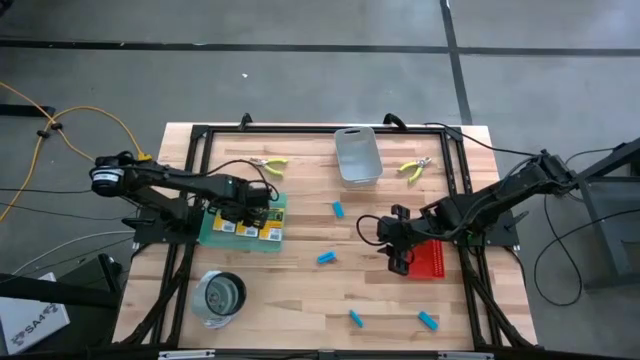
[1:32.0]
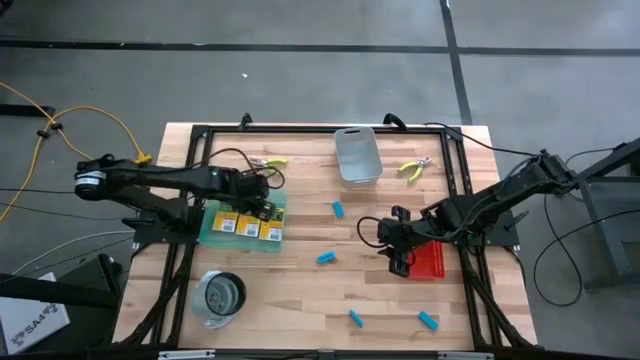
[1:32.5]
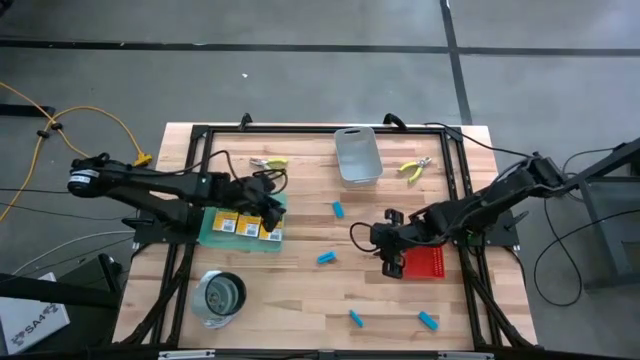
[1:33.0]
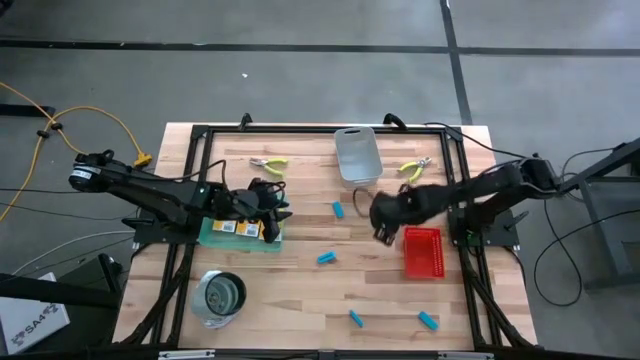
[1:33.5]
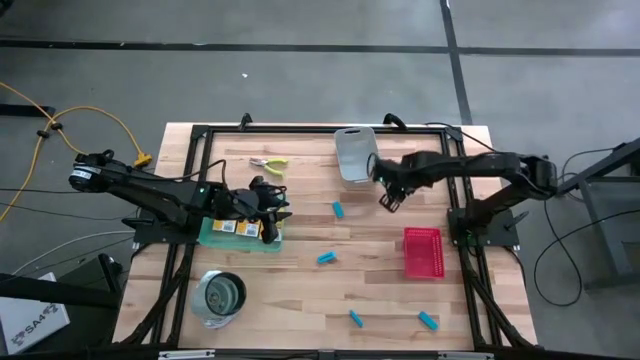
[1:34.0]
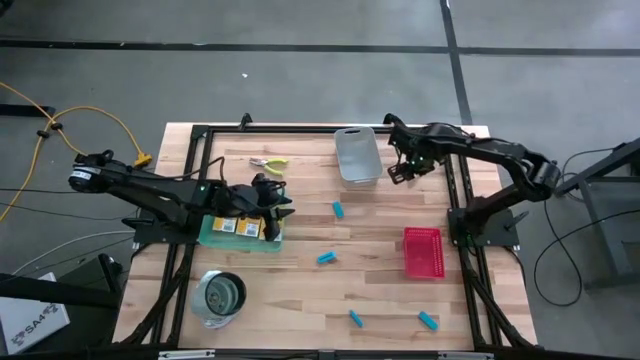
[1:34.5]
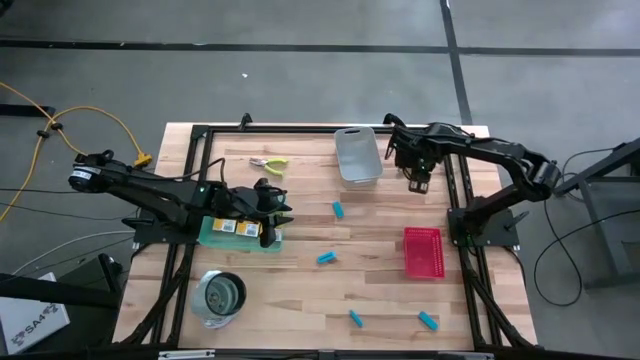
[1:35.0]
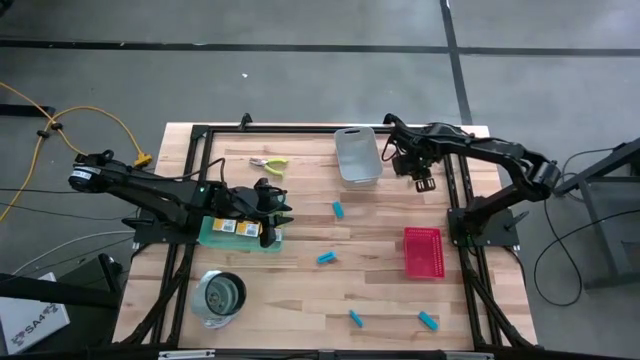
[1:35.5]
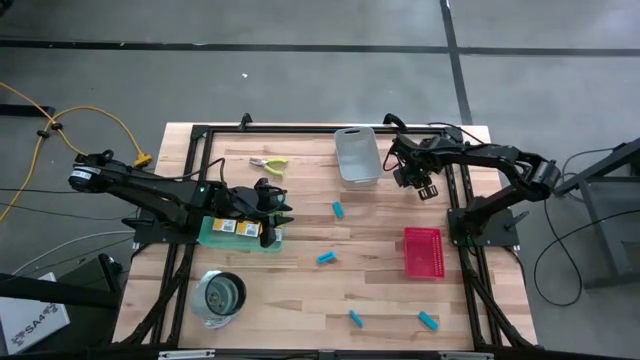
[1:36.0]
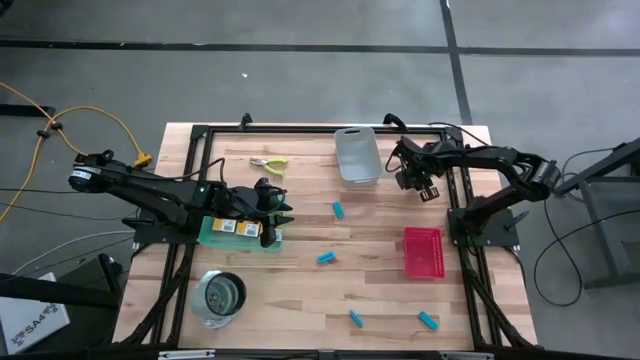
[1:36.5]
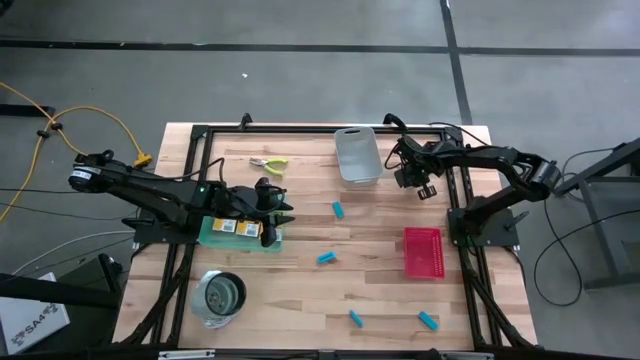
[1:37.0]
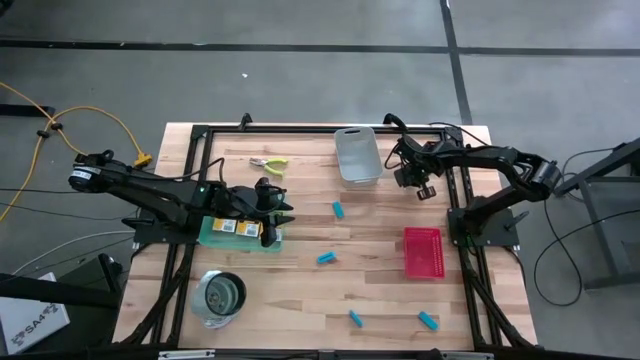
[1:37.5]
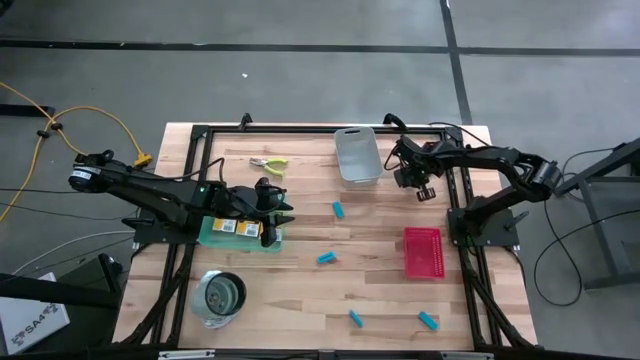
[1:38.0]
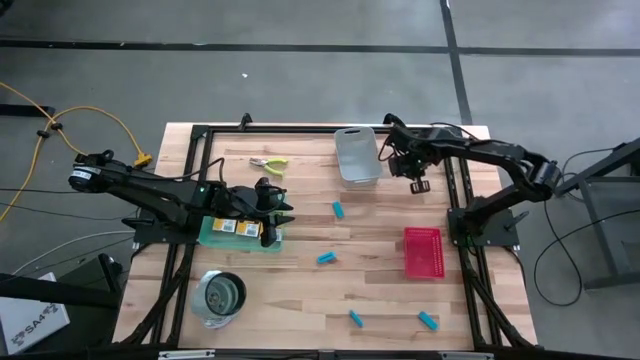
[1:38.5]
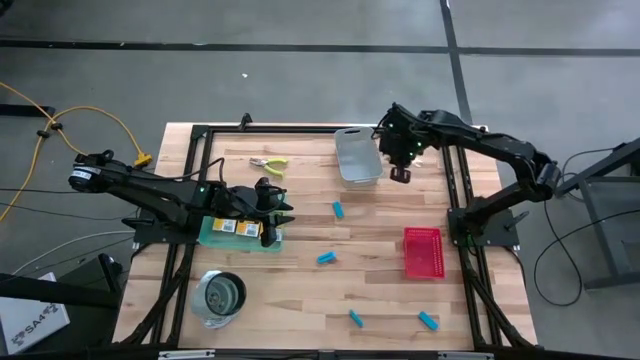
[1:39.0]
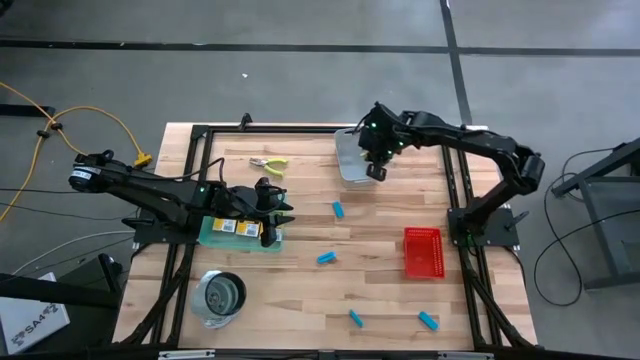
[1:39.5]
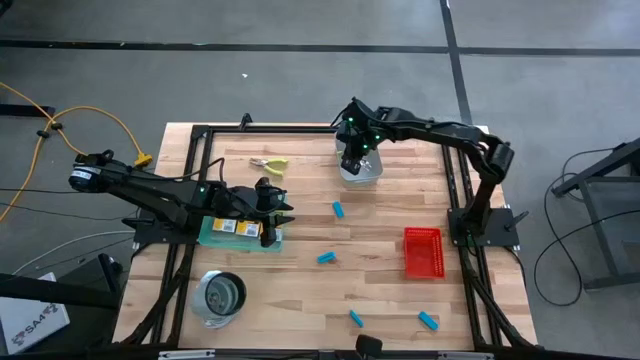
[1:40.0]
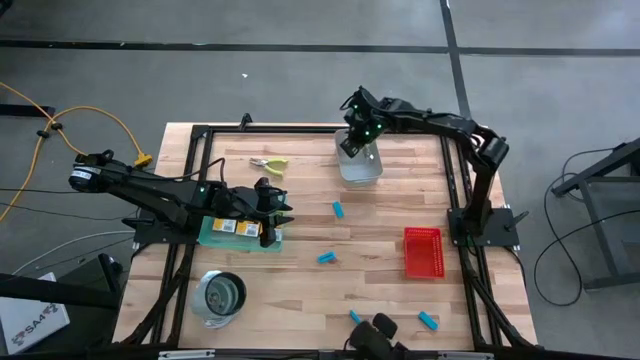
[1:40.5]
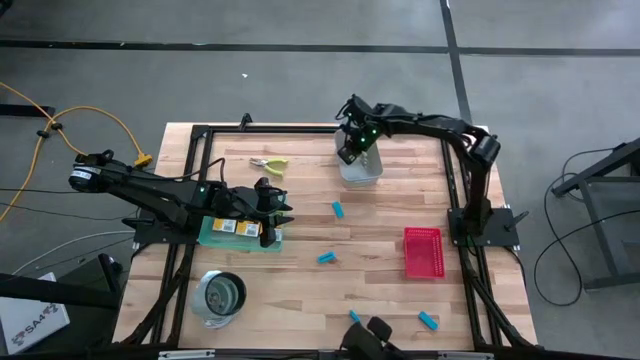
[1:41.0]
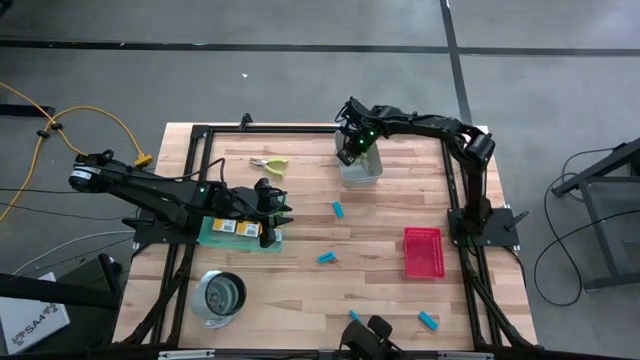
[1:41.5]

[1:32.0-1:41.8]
Task: Pick & Place School Supplies
Put the green puncher into the gray bin

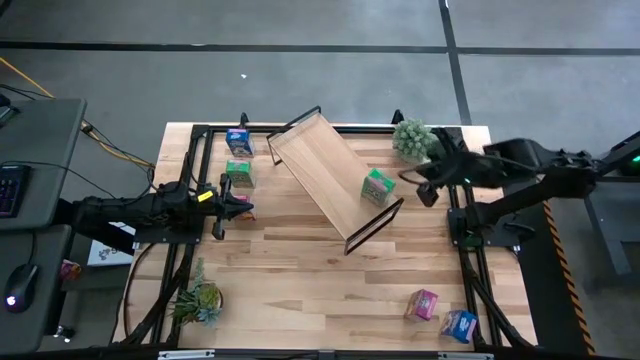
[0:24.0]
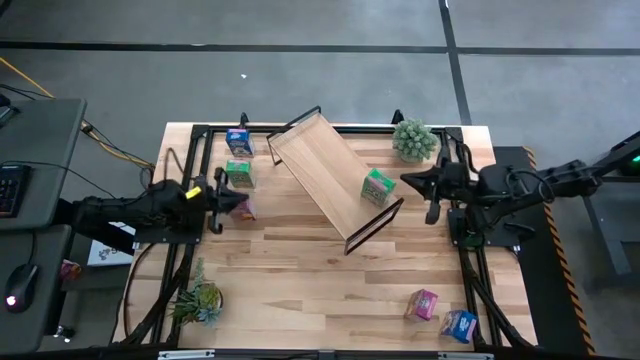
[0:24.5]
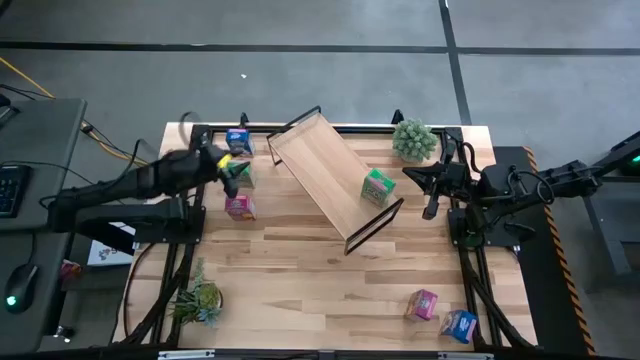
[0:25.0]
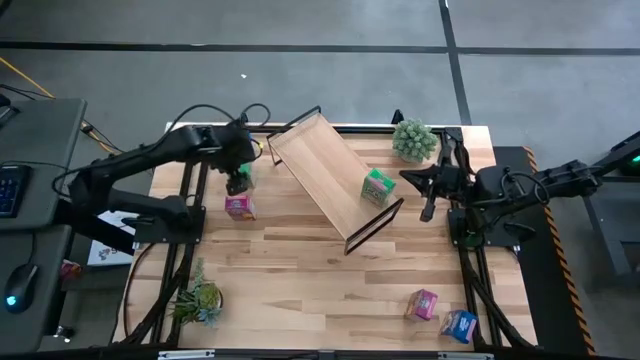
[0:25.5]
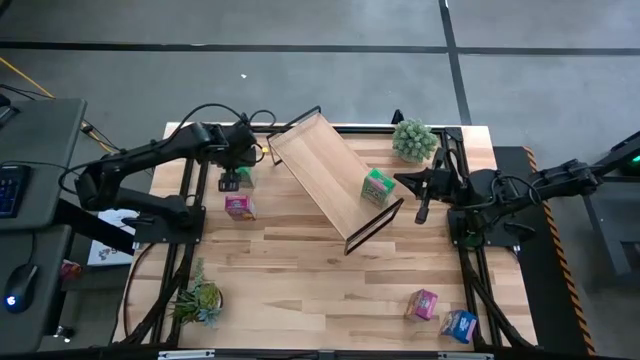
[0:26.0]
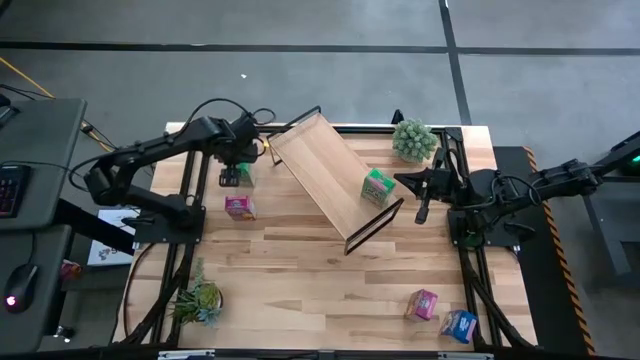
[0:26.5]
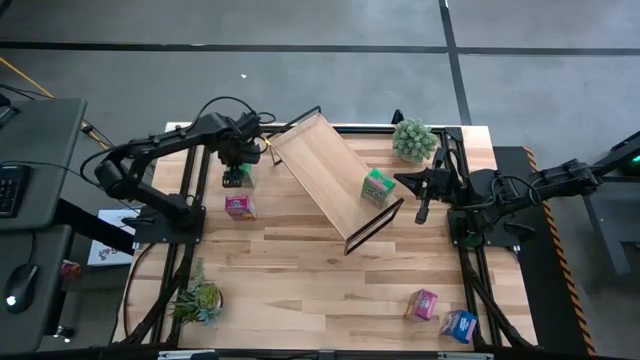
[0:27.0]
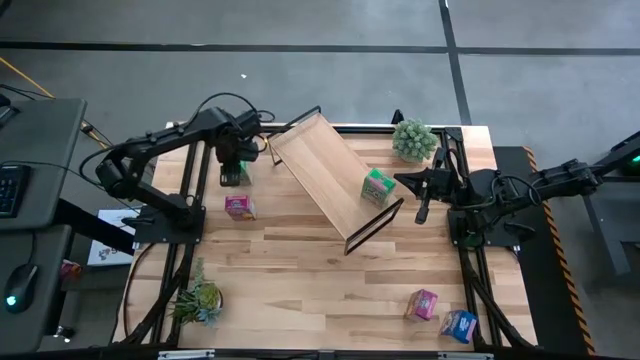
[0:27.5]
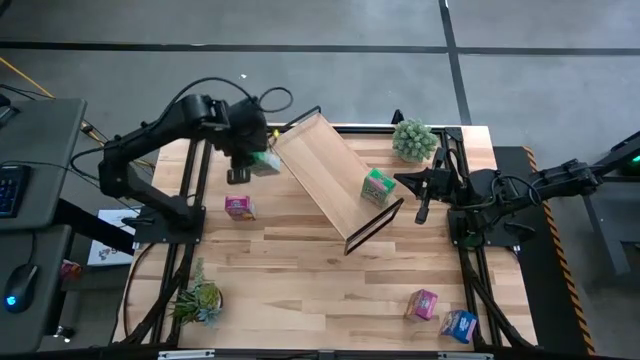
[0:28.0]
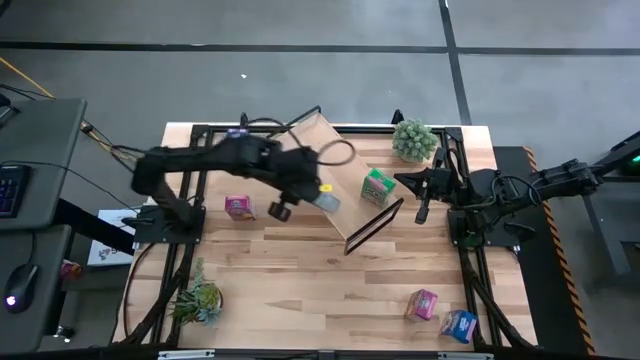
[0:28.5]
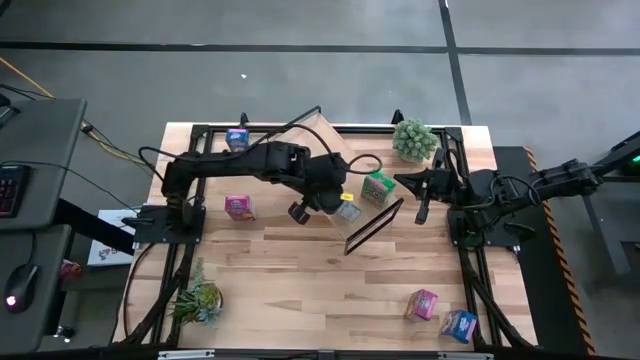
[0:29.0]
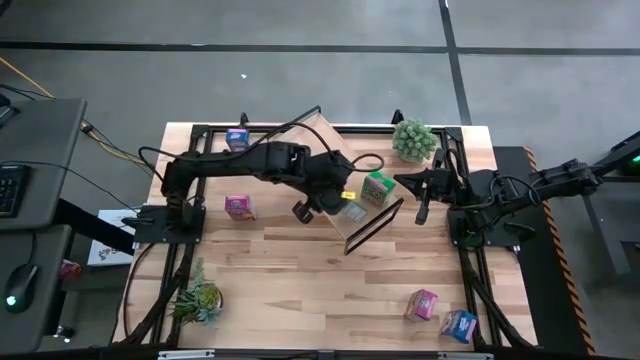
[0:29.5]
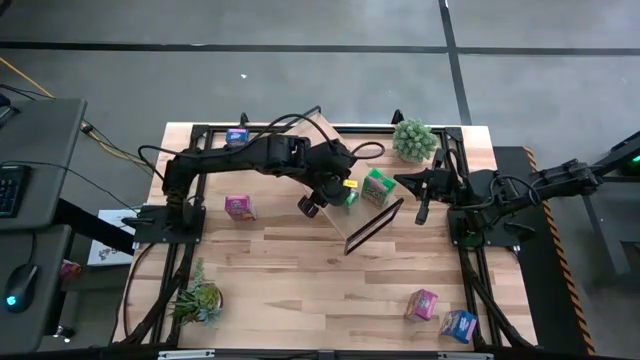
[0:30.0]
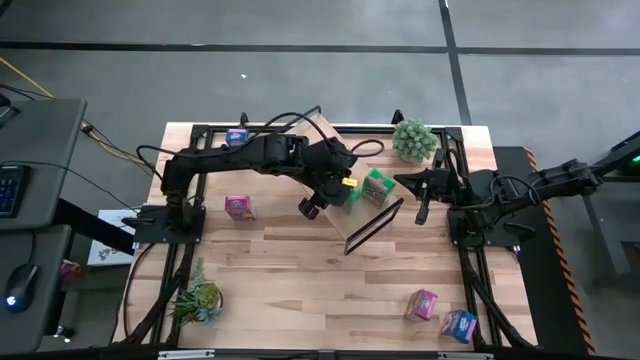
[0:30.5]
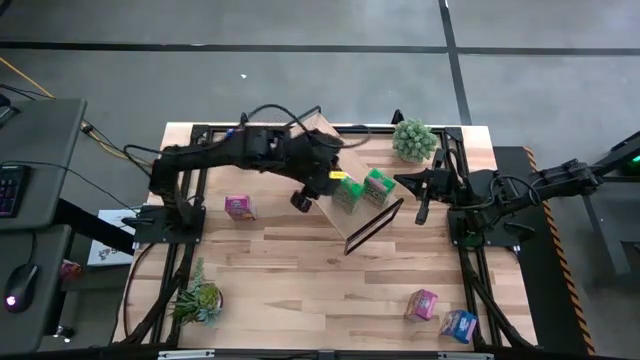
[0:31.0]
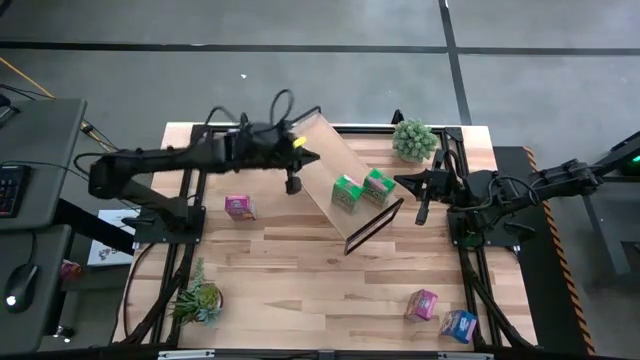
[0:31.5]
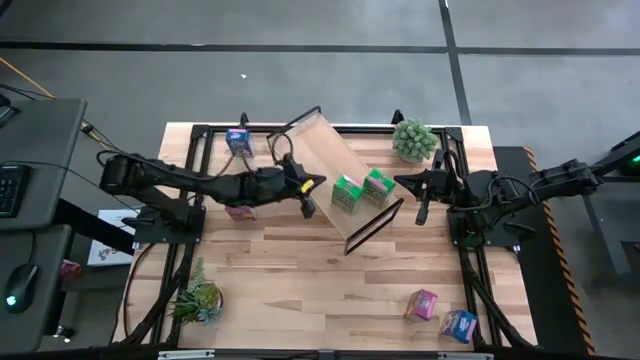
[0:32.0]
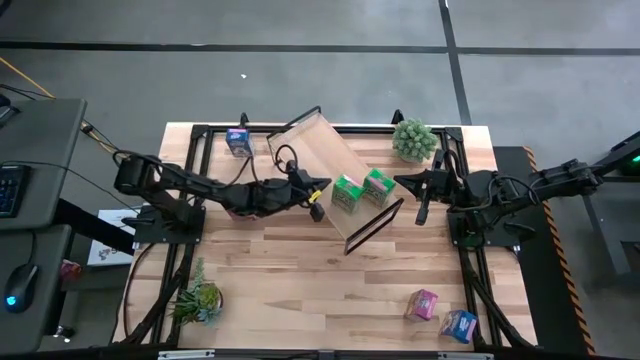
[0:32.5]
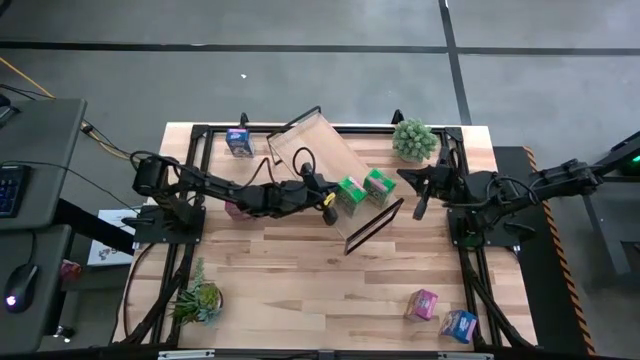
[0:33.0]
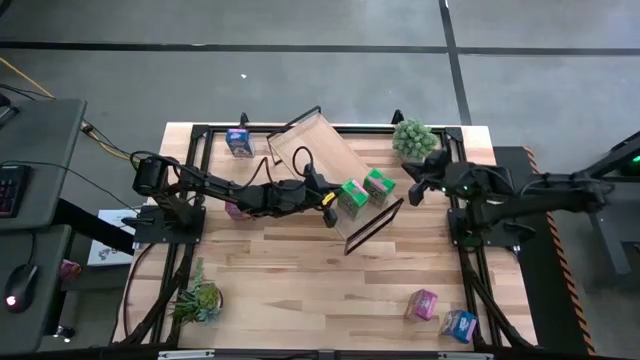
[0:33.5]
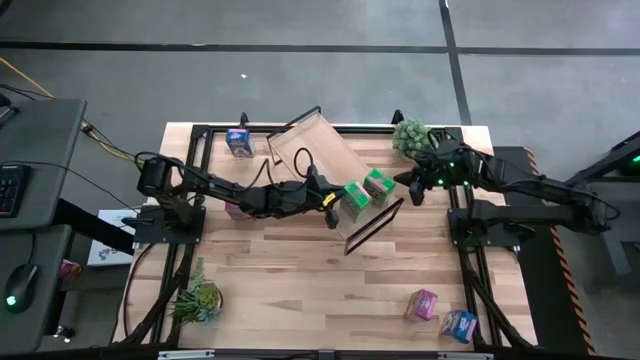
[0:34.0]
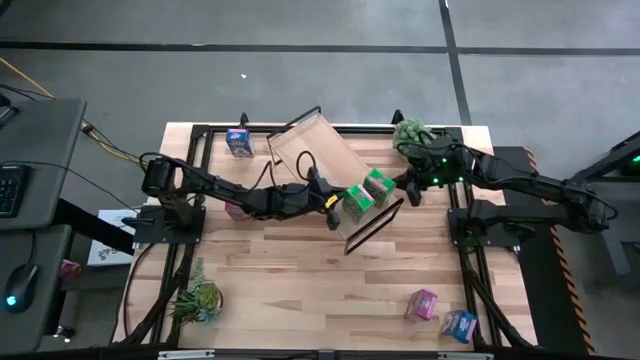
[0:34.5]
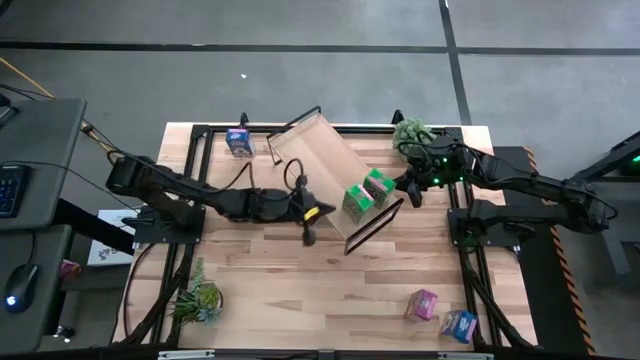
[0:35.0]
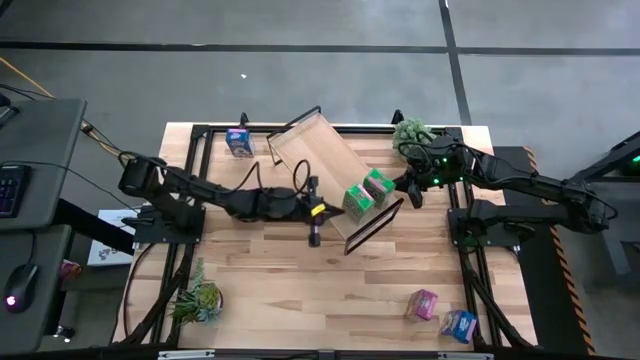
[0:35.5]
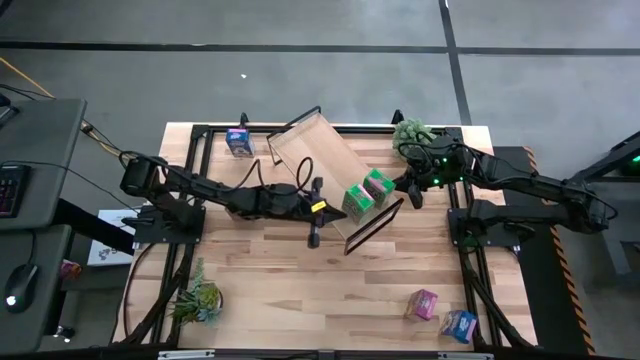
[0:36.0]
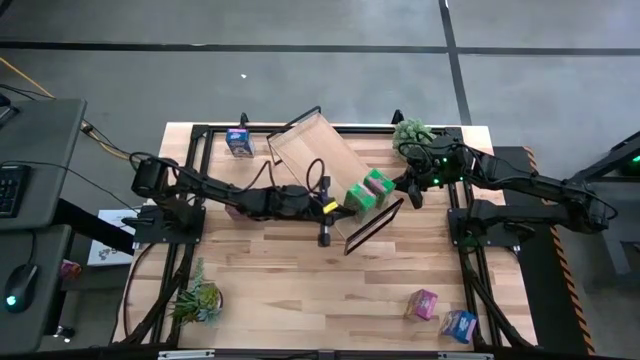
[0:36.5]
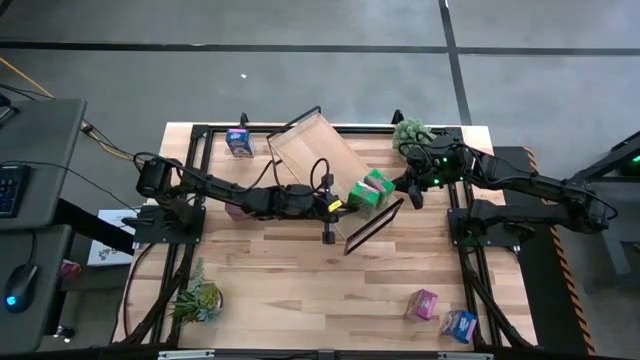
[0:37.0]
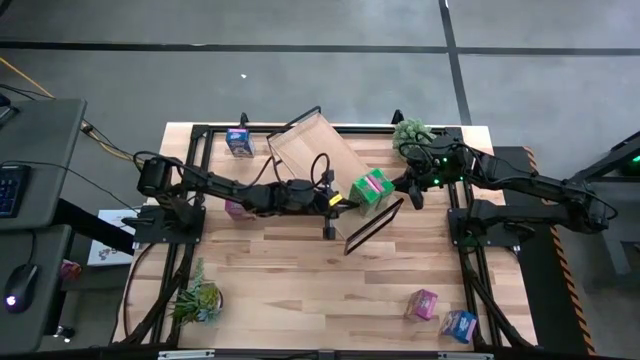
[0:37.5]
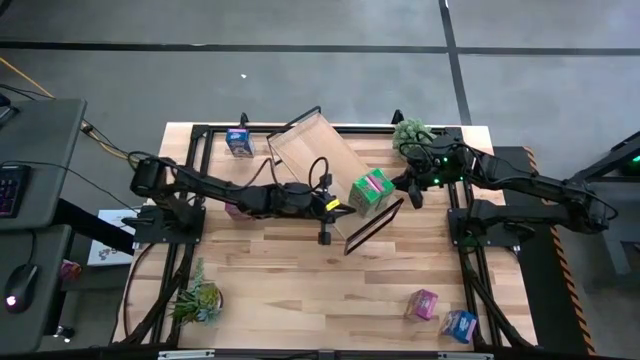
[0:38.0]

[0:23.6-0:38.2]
Task: Stack cereal on shelf
Put the green cereal box aligned with the other green cereal box on the shelf
